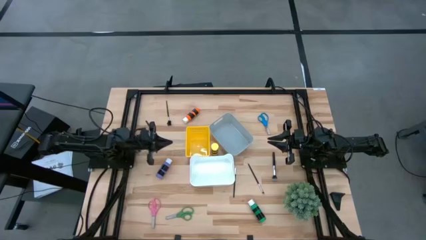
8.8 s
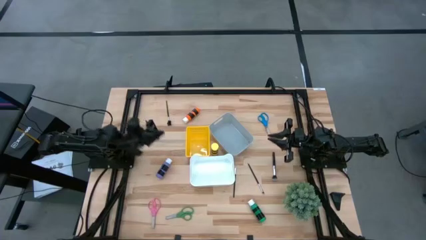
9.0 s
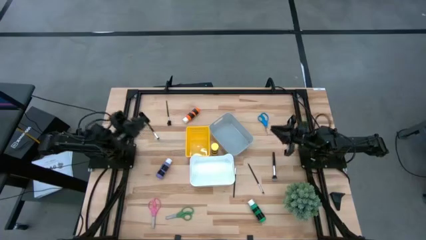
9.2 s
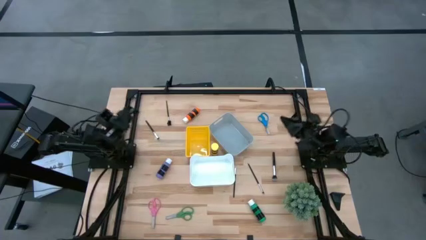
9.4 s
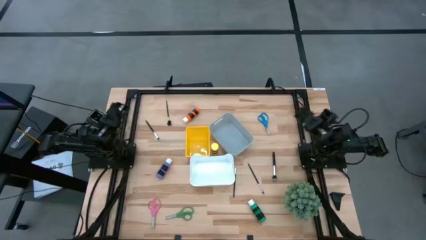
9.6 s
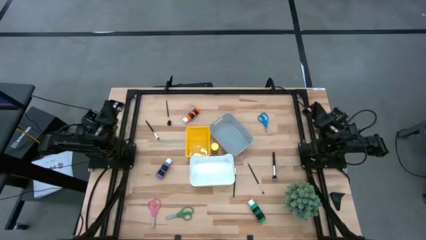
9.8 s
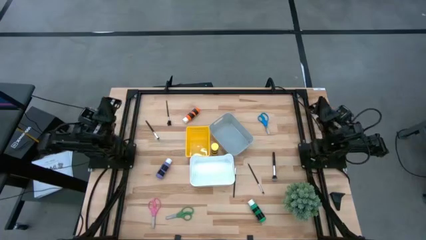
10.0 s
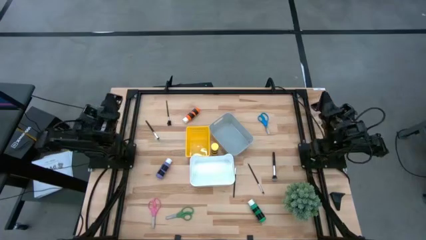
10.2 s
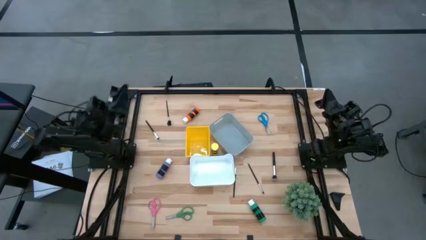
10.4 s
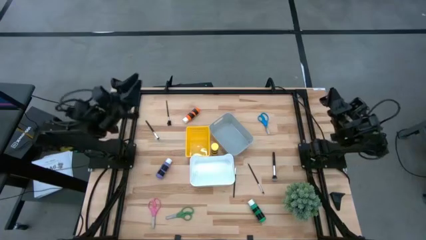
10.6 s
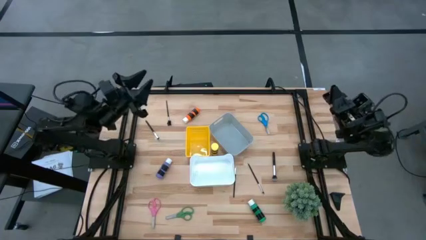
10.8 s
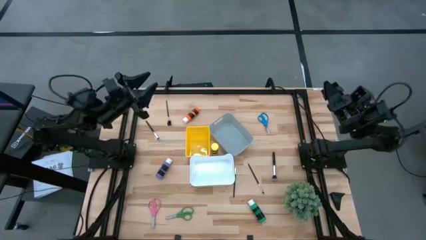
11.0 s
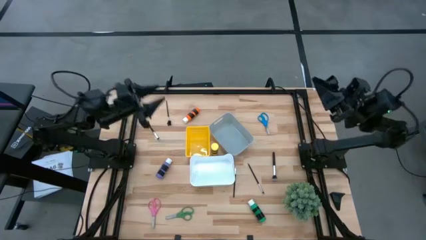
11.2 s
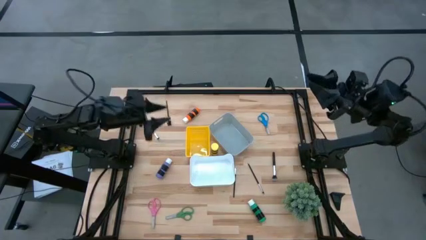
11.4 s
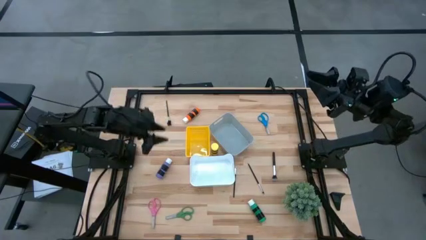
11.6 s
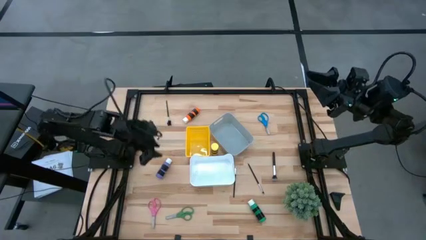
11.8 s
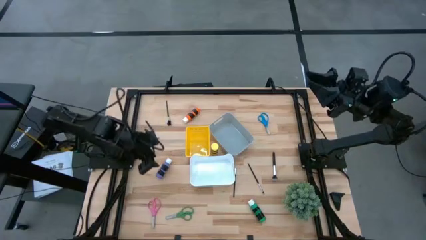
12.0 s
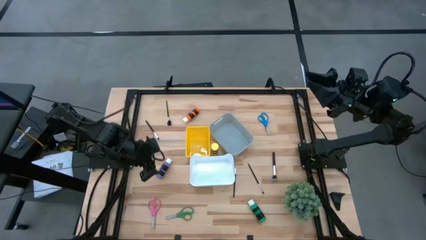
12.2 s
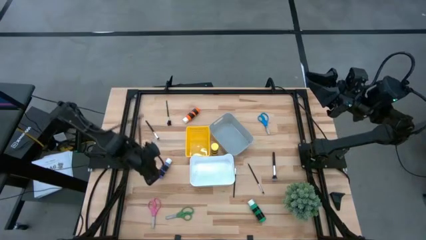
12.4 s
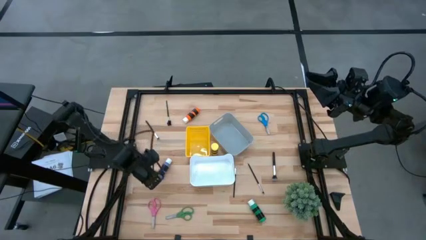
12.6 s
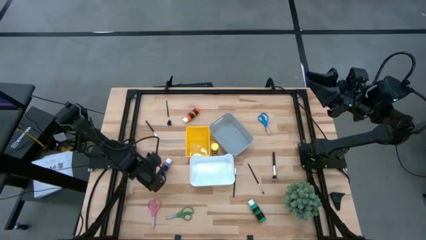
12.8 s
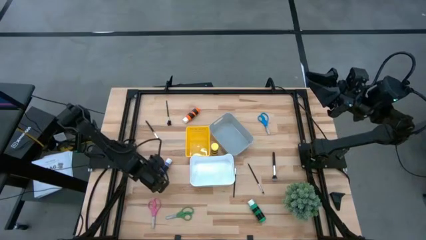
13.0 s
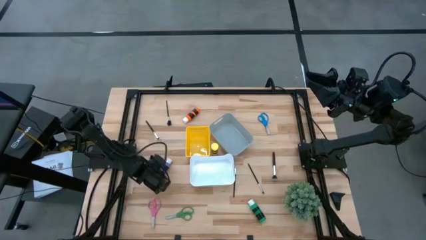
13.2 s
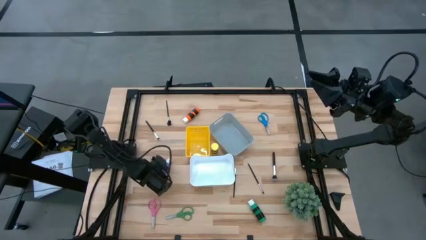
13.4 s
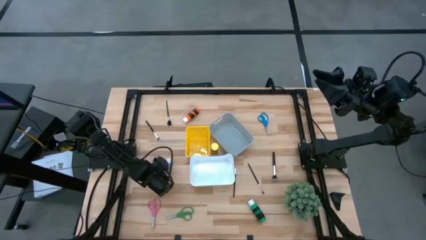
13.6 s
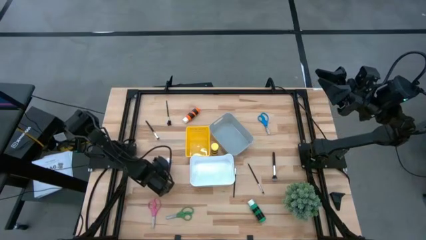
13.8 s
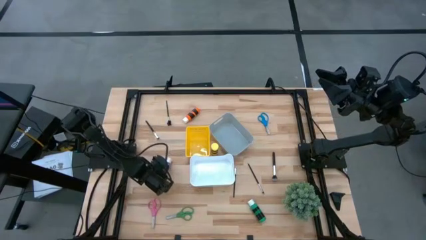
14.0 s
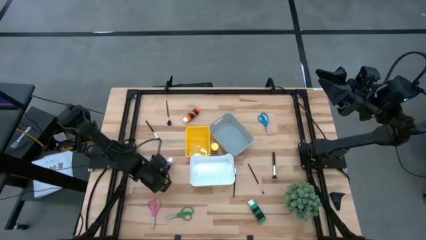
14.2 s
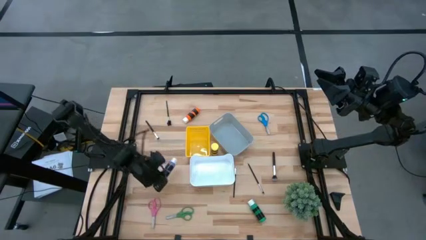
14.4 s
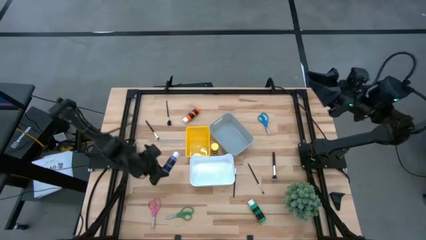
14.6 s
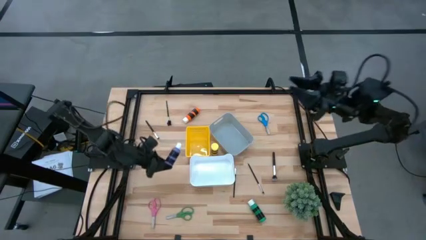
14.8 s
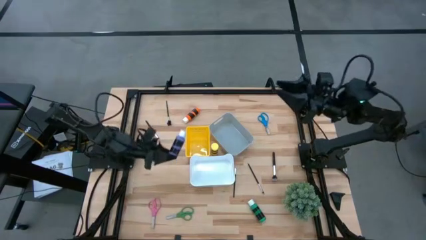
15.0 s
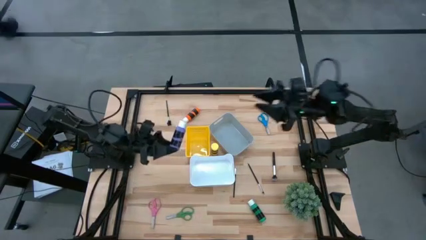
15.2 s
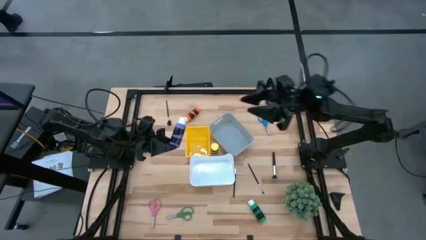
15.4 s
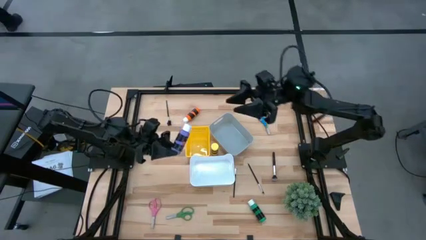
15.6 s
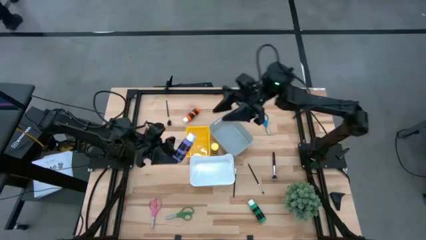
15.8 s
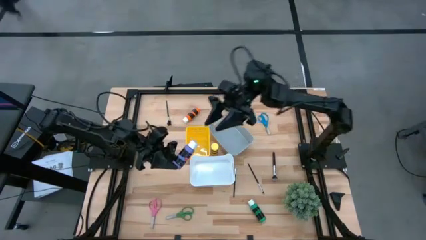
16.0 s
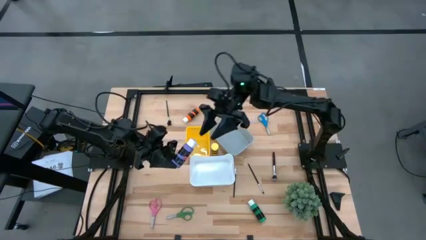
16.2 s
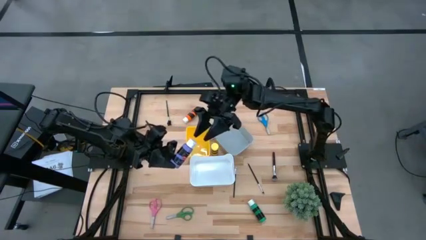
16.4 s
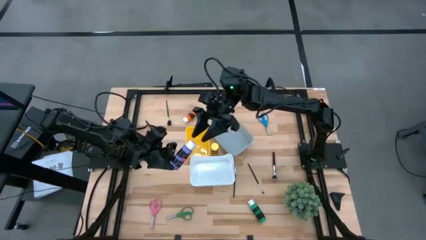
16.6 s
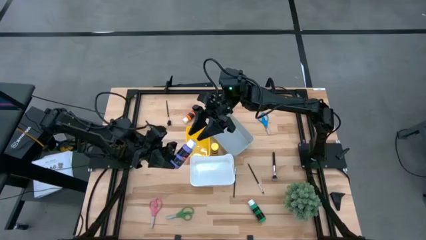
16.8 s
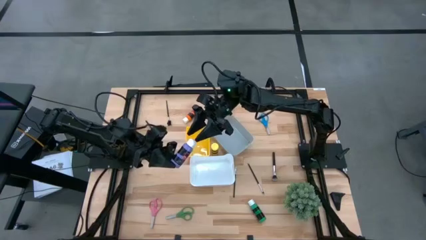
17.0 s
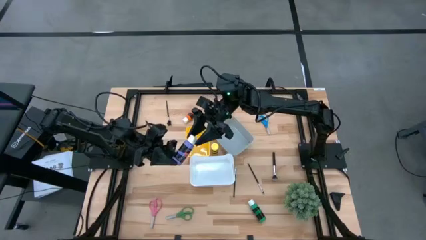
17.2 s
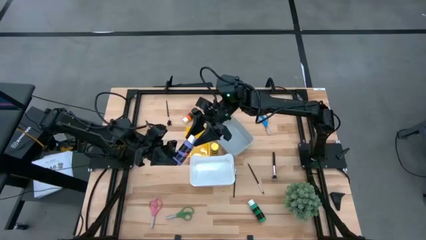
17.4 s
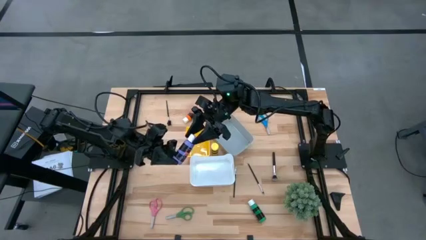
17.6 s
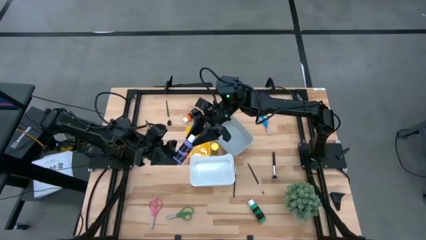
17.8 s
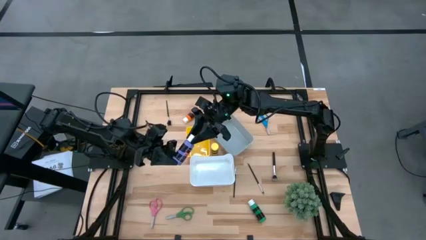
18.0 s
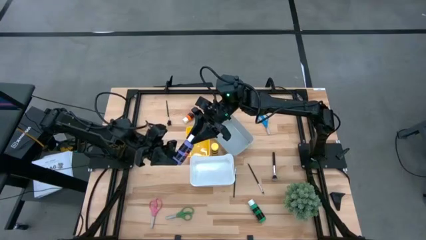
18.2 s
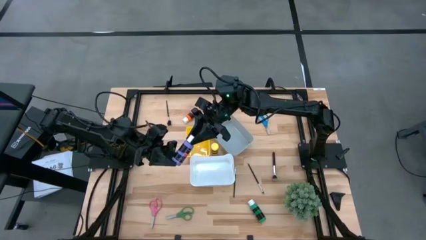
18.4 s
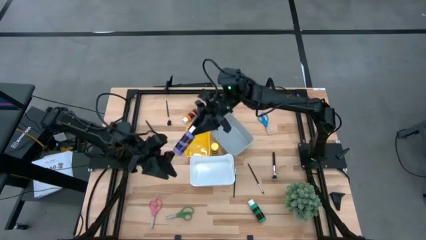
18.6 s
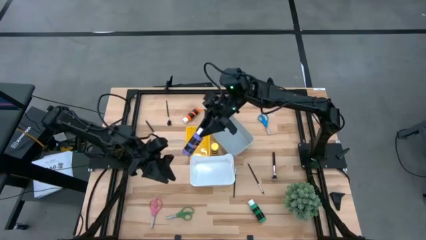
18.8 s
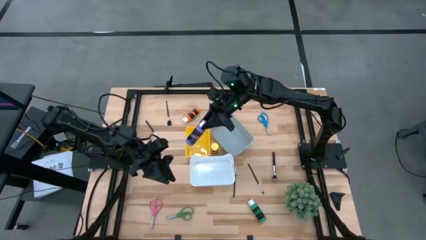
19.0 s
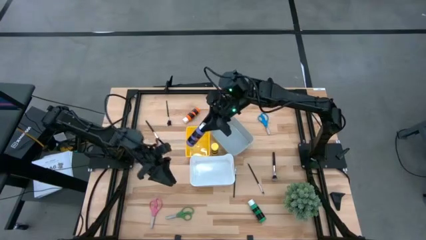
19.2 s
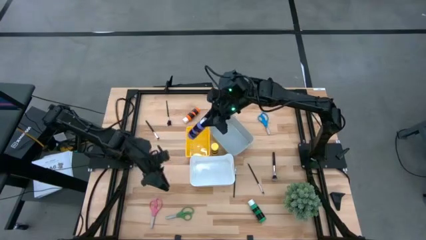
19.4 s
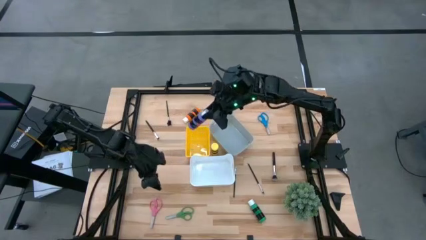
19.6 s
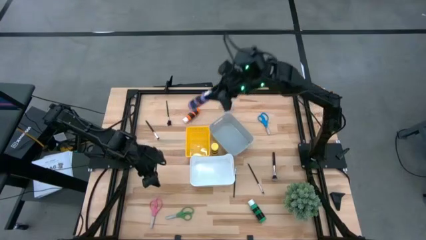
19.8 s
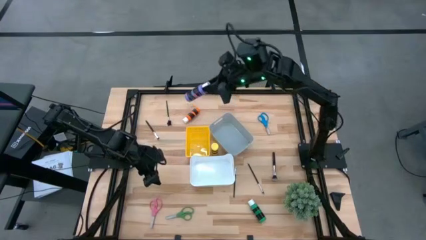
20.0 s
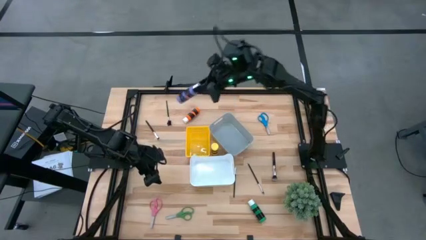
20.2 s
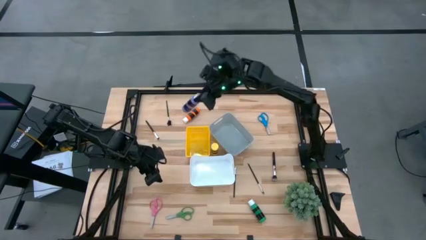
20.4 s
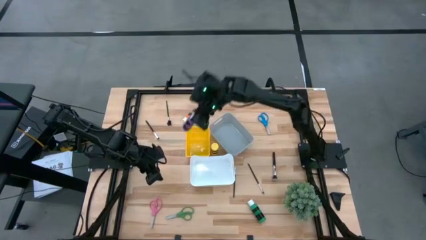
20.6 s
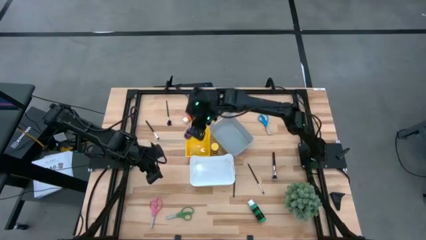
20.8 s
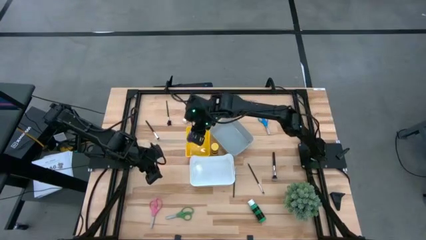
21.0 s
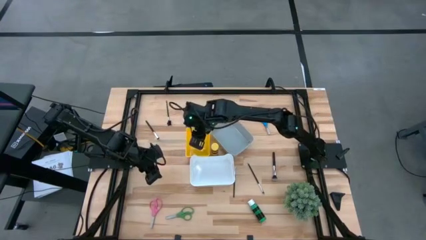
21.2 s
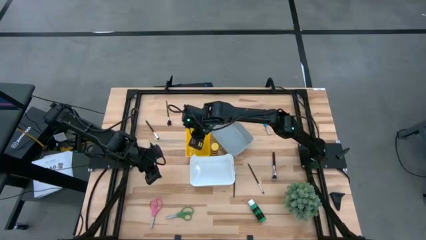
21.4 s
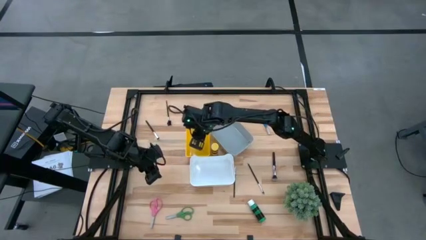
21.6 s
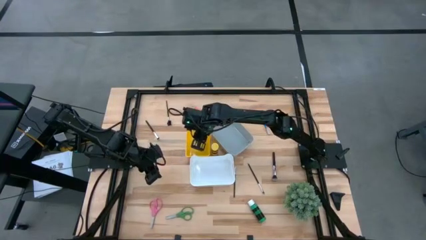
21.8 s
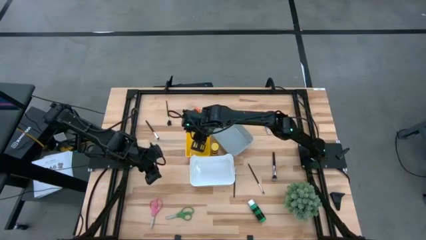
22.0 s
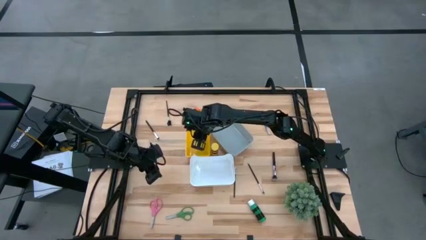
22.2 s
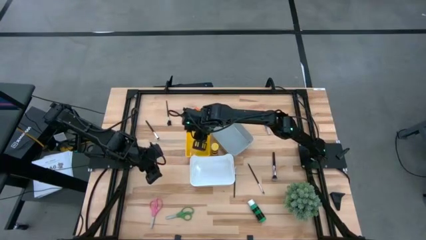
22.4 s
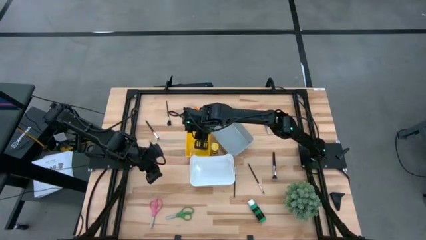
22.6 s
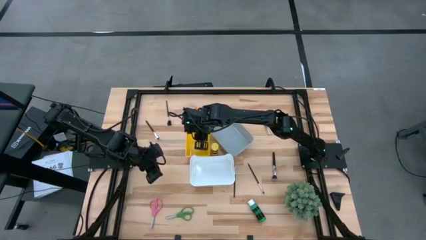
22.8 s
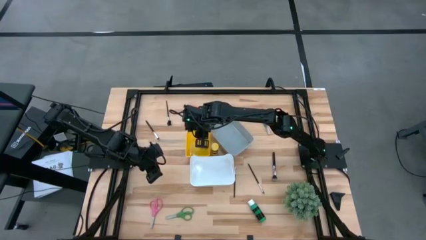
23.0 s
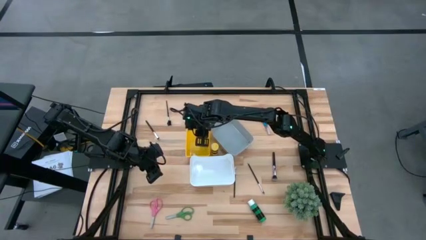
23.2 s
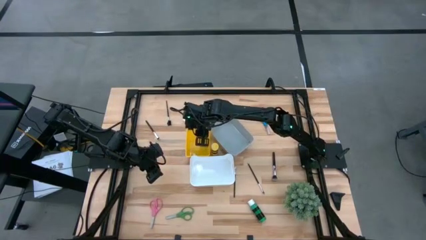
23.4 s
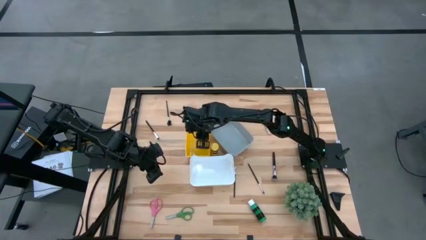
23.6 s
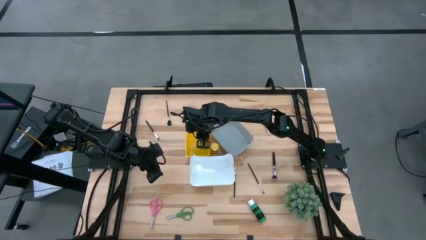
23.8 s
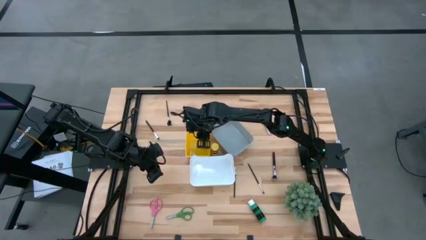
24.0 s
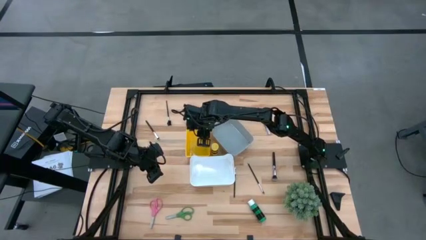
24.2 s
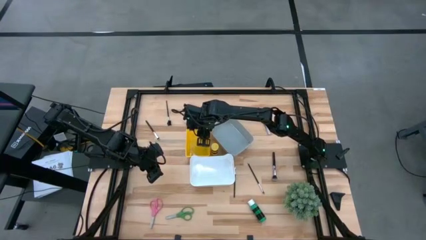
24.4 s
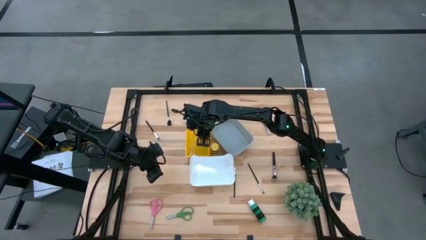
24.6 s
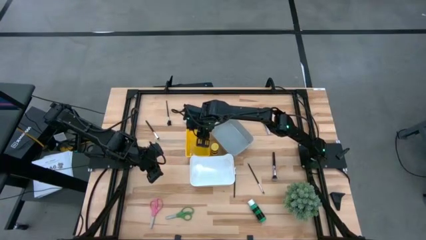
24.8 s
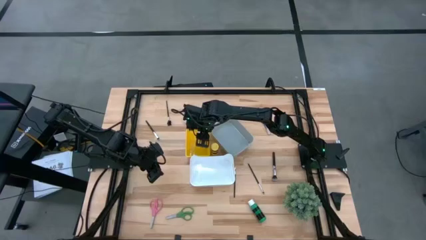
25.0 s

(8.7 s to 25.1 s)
Task: Pick & Place Paint Supplies
Put the purple paint bottle into the yellow bin
